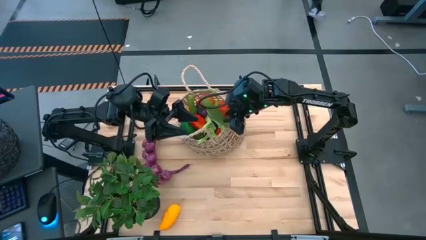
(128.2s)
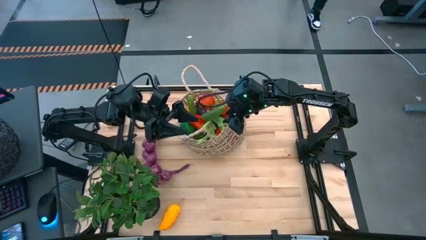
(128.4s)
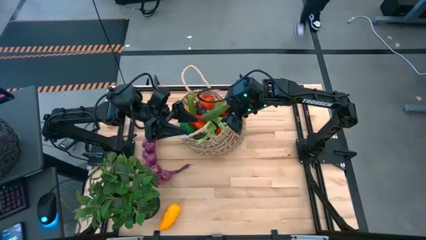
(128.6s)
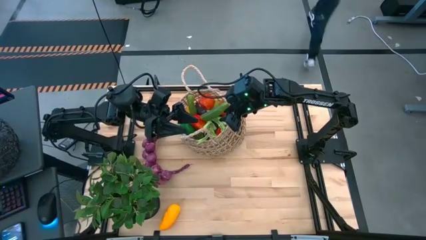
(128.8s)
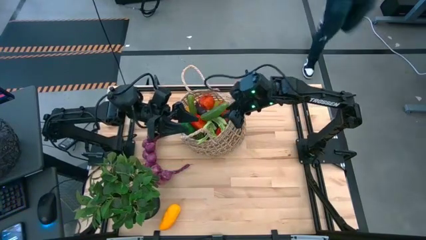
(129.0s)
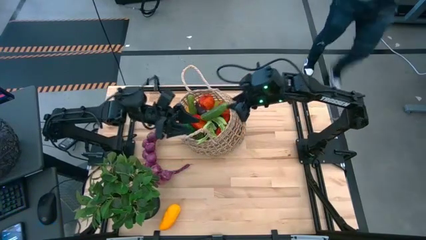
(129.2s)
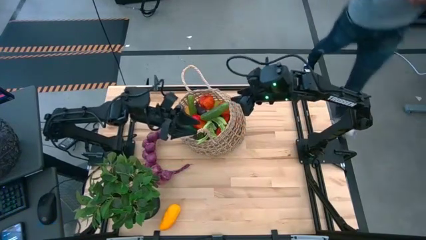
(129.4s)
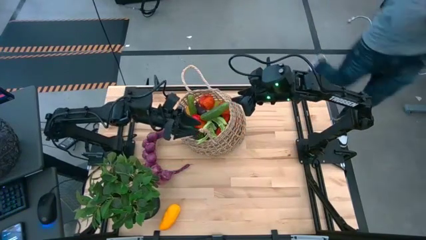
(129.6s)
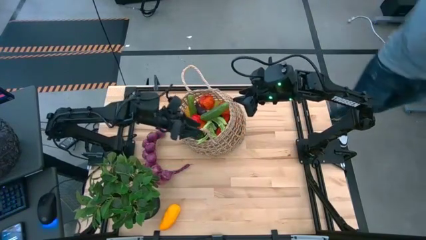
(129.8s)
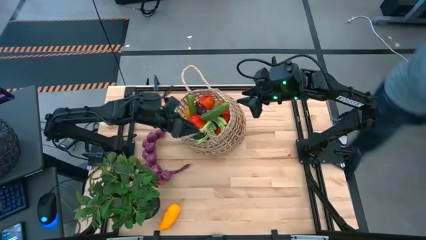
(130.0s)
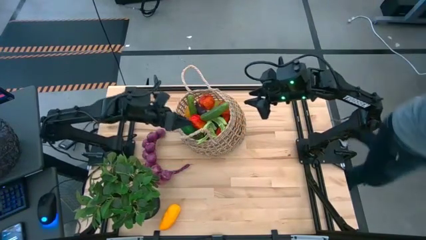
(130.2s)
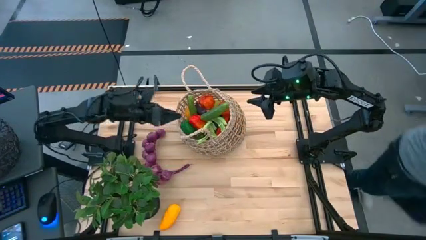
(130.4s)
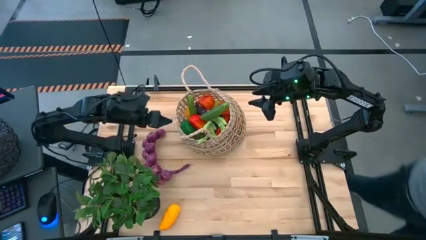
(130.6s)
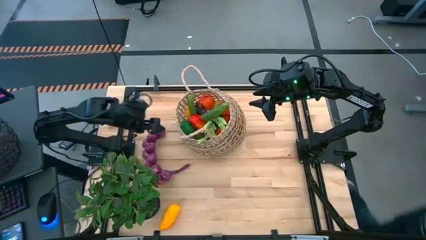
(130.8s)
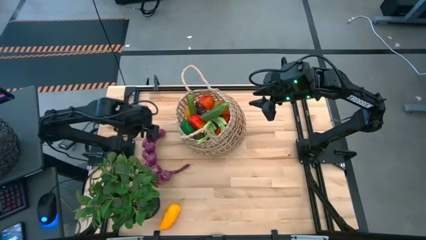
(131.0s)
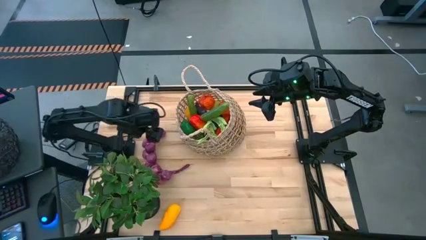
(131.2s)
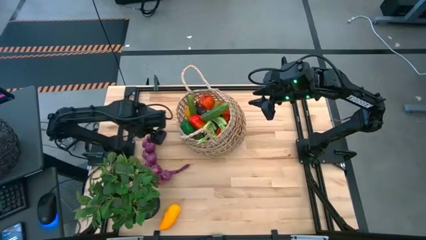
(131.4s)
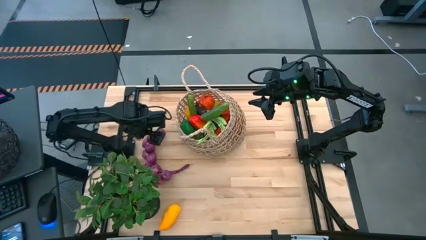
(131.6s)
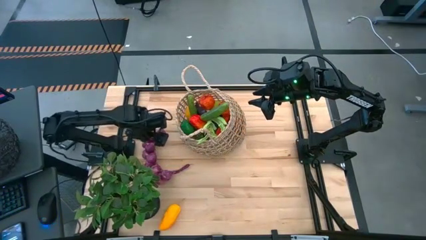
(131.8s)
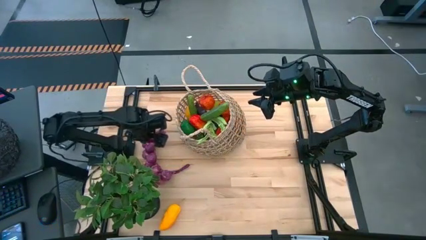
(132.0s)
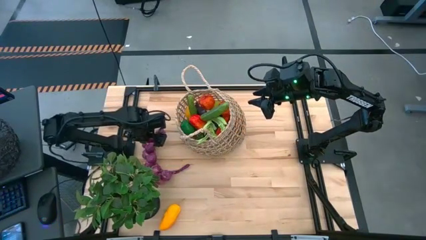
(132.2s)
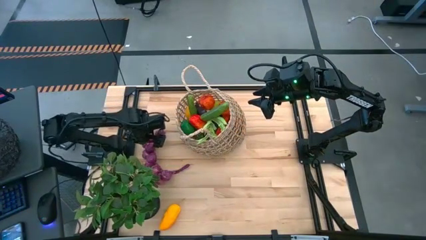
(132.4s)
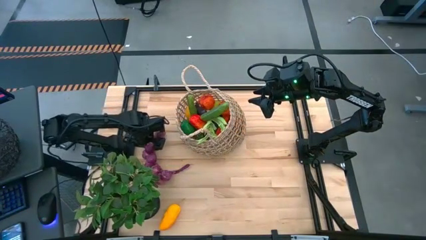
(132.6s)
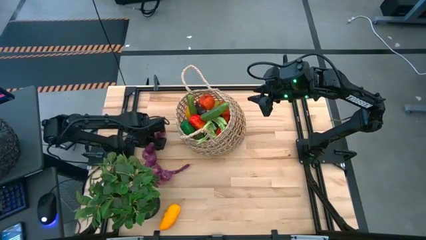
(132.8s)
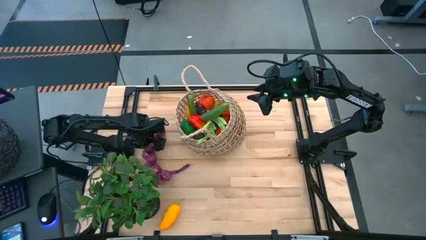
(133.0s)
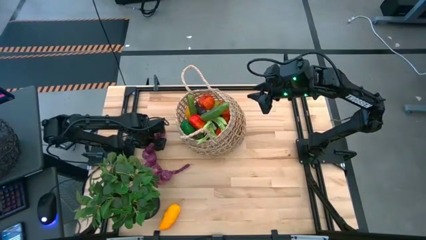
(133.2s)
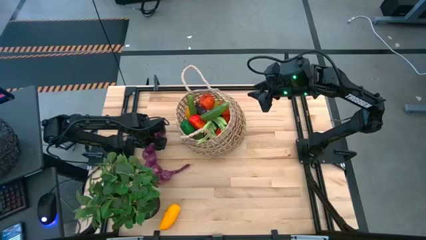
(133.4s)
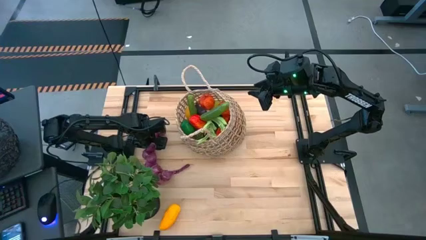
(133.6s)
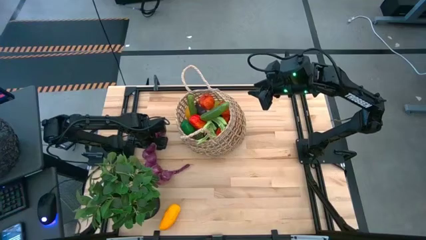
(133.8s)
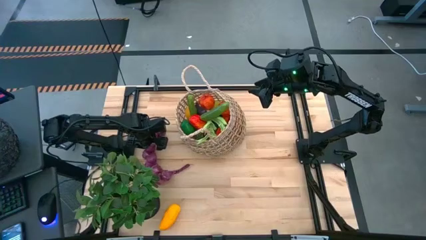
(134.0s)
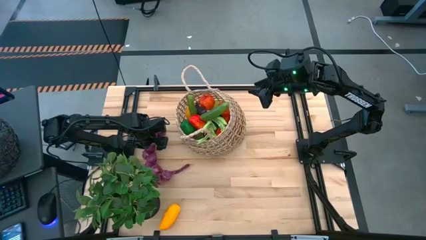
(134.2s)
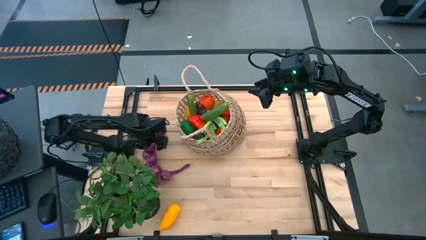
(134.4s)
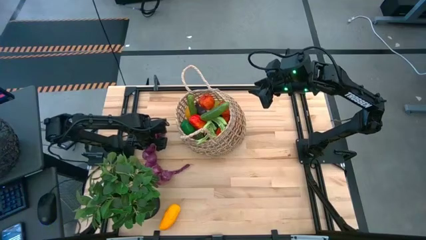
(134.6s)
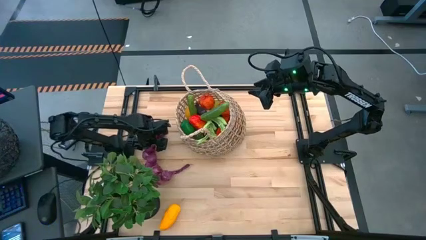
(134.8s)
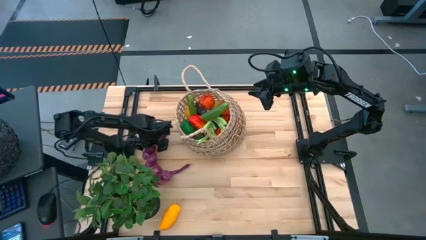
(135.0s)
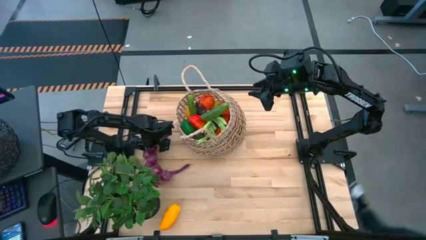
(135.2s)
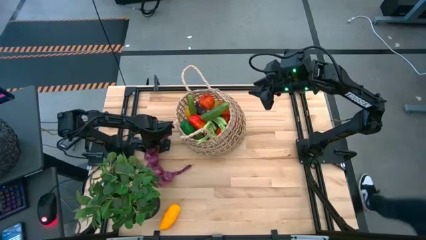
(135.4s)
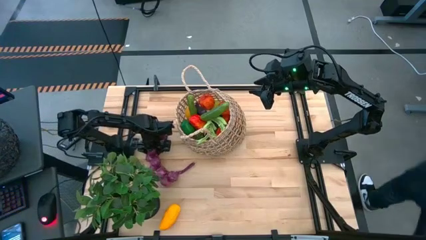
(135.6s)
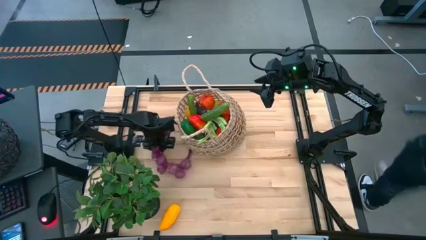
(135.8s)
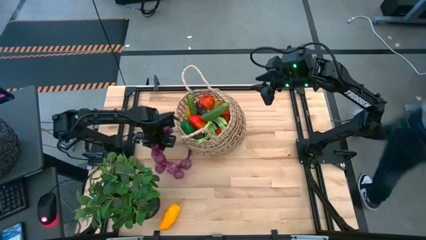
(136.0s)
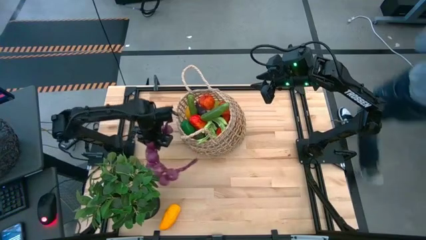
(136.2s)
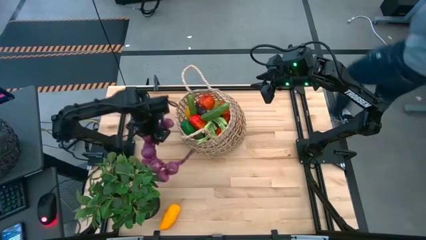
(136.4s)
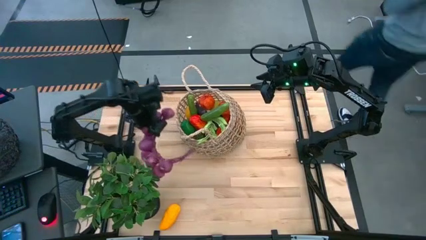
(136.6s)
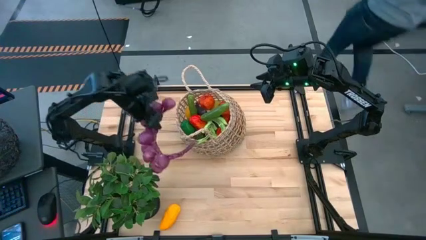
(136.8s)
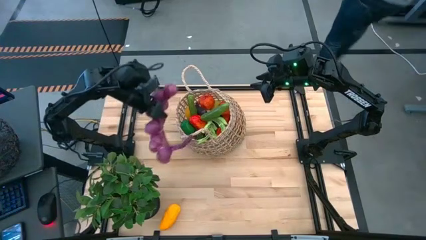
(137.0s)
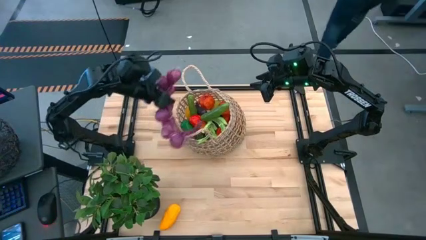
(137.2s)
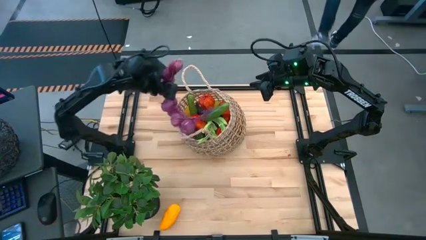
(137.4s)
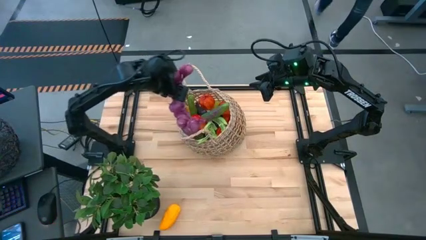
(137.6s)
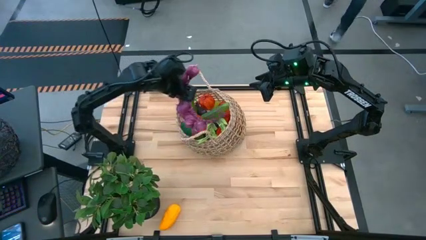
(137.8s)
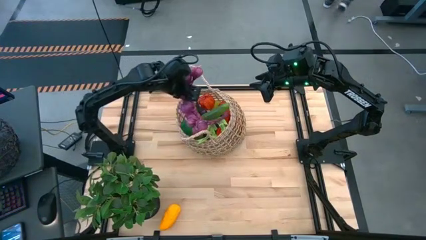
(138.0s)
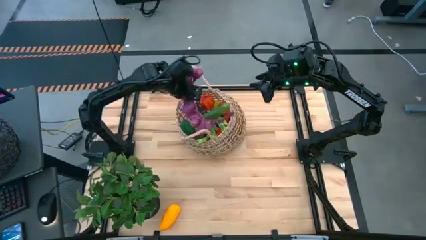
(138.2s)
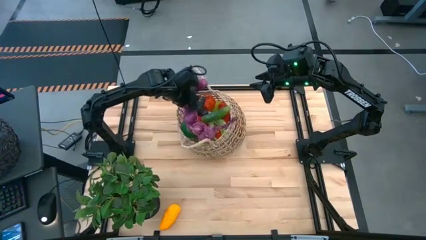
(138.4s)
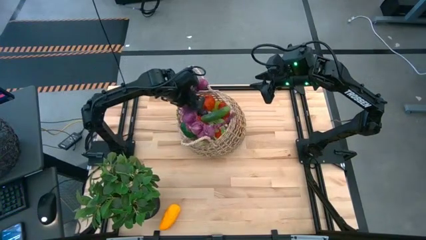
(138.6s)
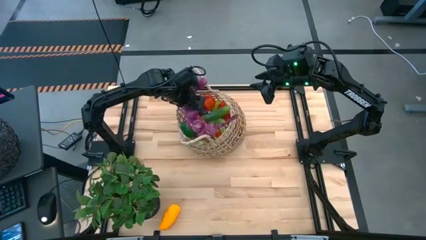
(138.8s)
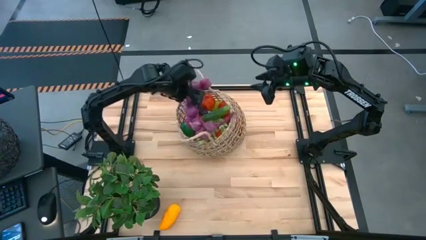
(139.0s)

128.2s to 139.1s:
Task: Build produce basket
Put the purple garlic into the brown basket

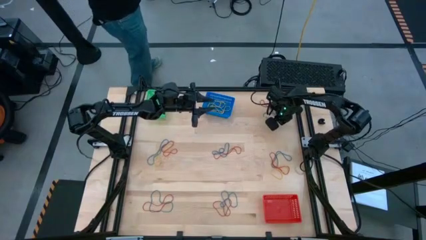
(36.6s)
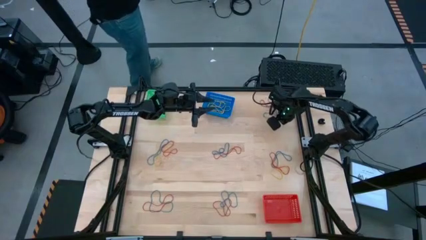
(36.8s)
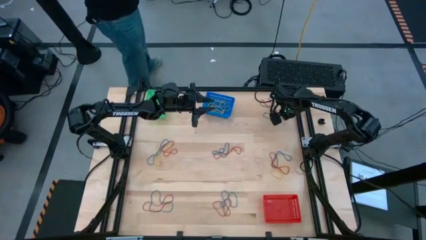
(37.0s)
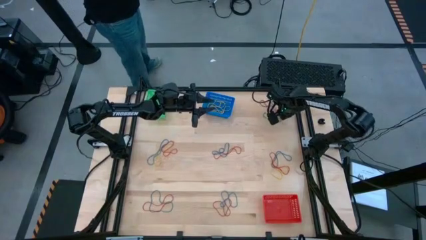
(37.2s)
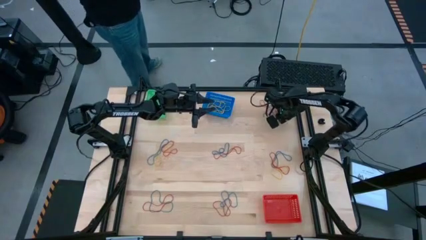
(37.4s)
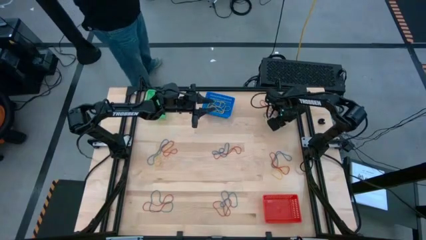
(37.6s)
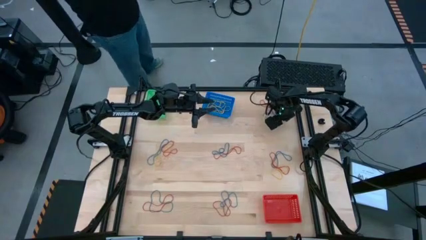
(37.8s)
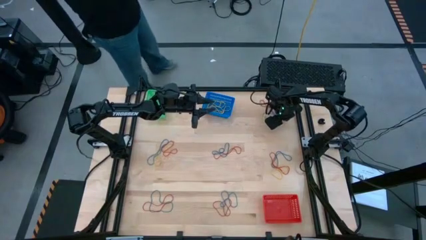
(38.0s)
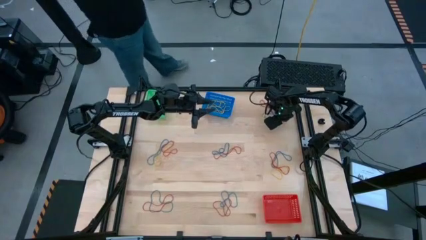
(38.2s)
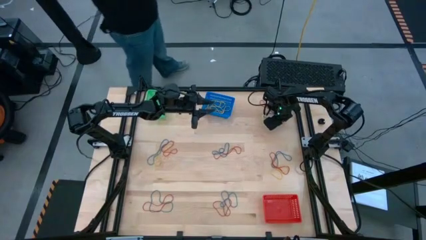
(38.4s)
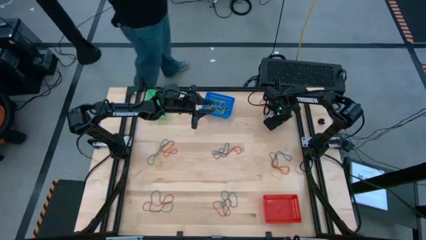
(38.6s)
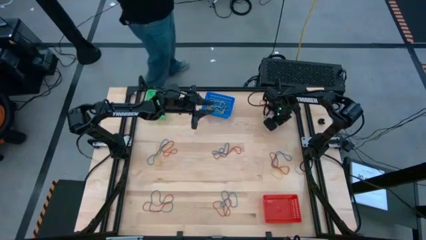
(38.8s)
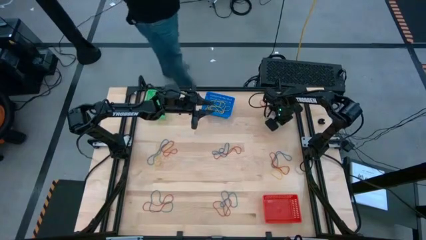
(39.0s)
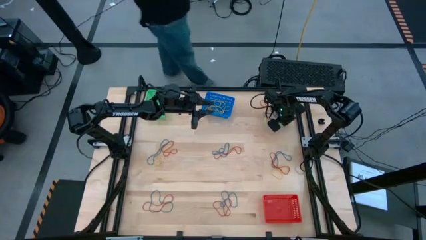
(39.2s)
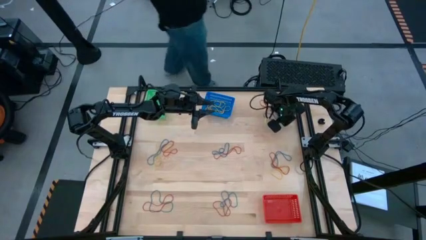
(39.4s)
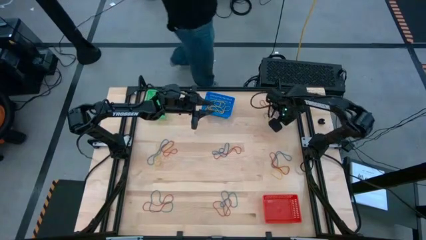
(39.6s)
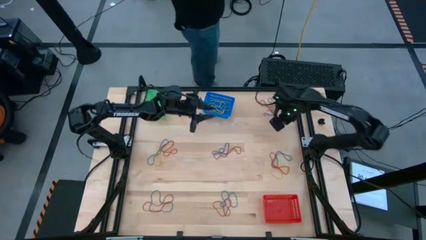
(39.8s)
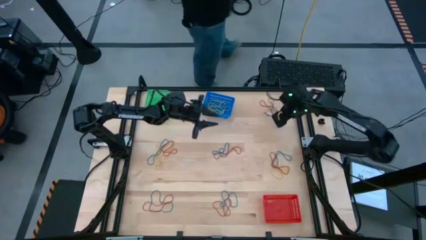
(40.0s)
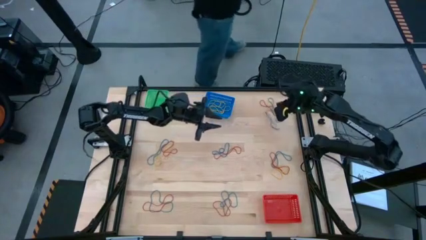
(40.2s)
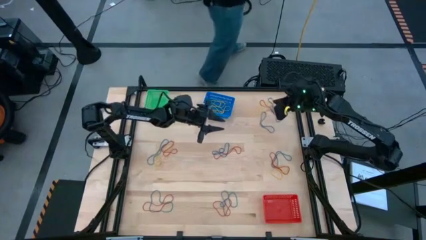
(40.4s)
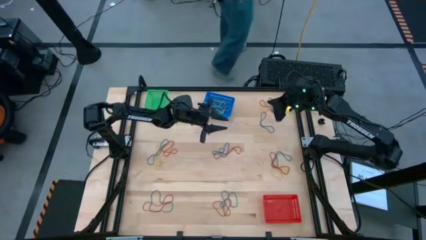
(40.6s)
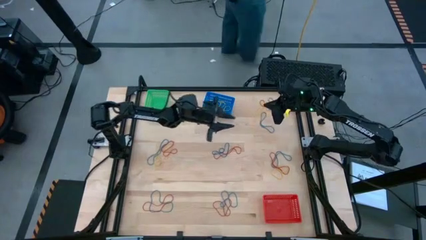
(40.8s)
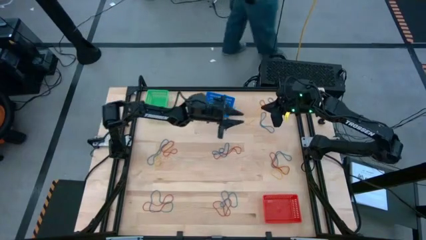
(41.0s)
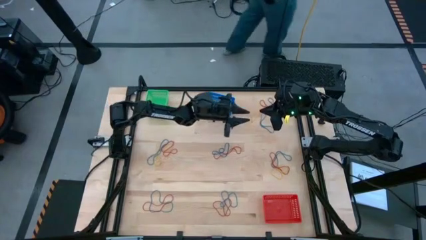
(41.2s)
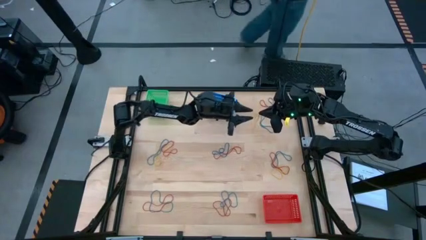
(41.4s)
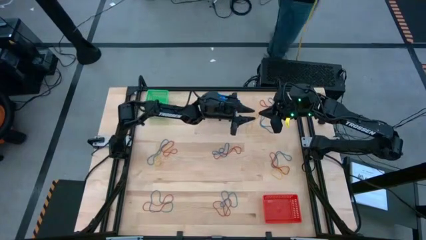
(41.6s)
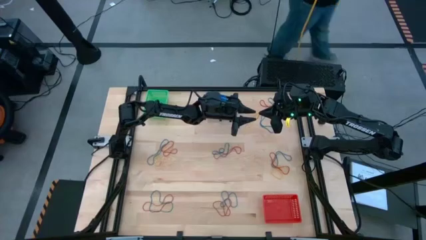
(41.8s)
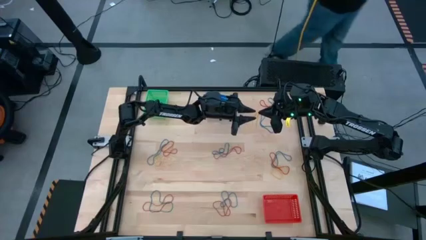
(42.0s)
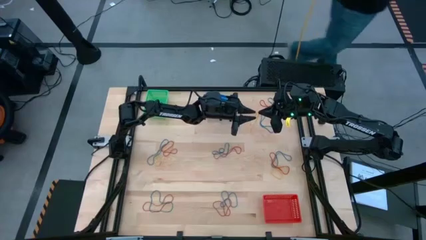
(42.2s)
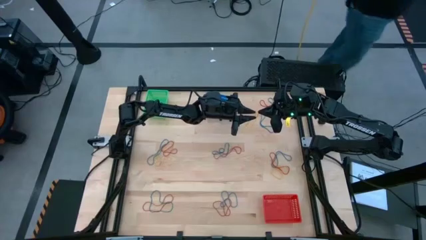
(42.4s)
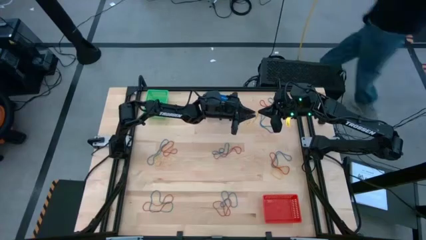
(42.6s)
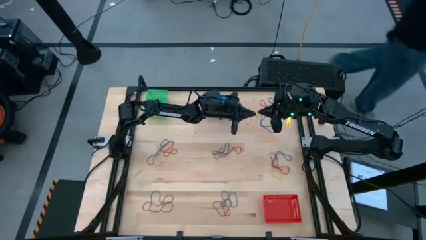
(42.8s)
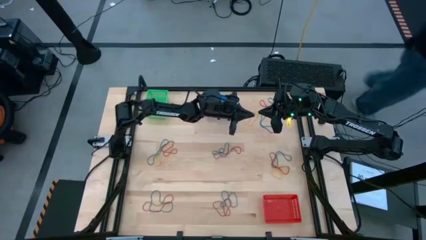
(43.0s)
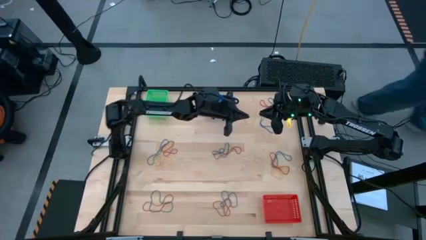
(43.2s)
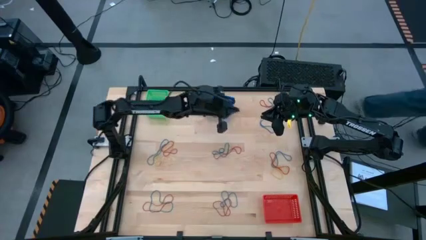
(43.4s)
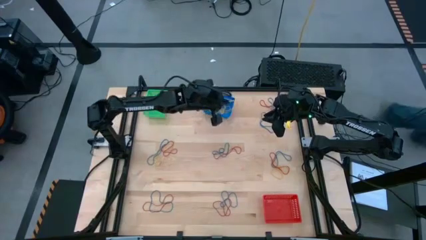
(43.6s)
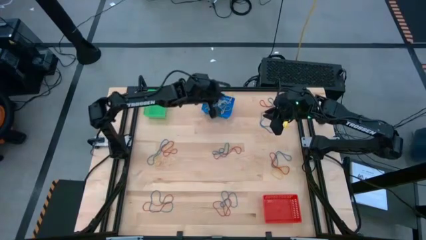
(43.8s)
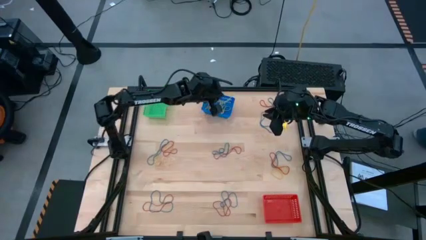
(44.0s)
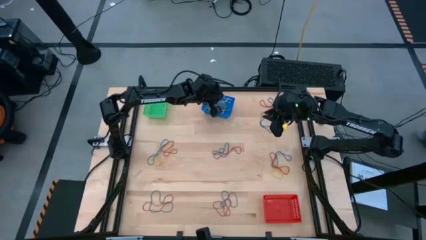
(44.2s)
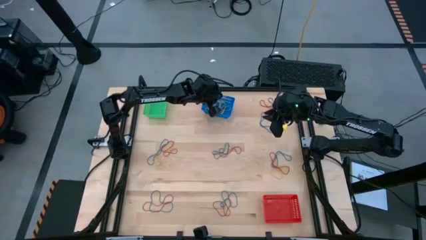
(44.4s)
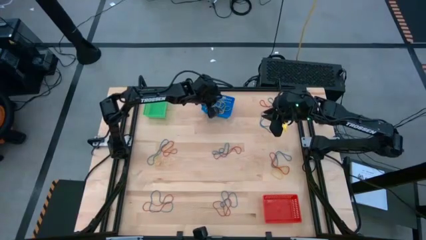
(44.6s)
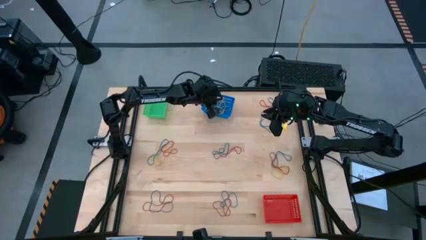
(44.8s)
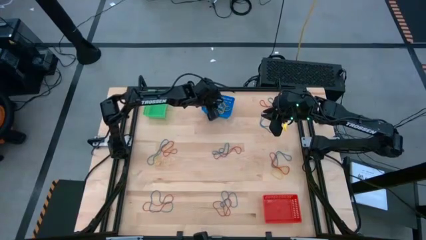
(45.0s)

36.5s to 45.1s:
Task: Sort rubber bands into baskets
Put the yellow rubber band into the blue bin
